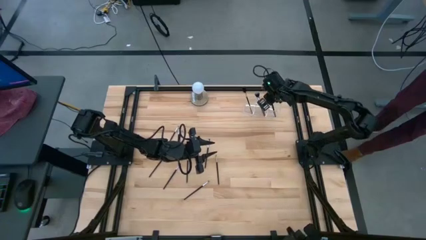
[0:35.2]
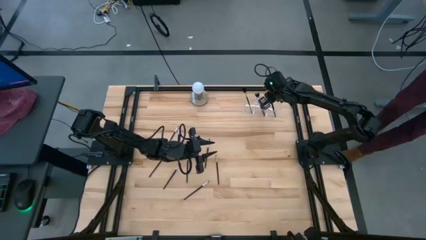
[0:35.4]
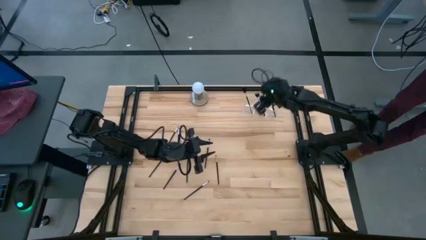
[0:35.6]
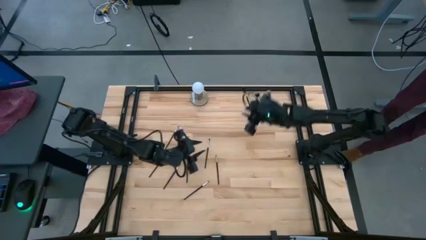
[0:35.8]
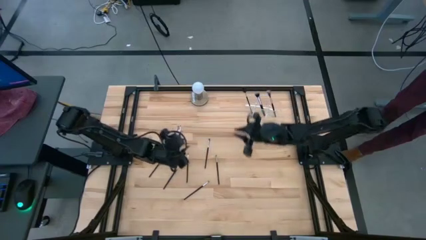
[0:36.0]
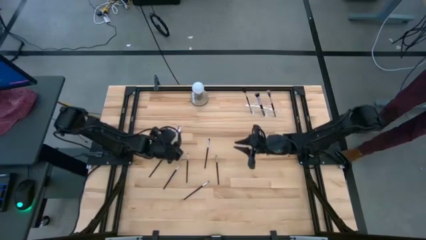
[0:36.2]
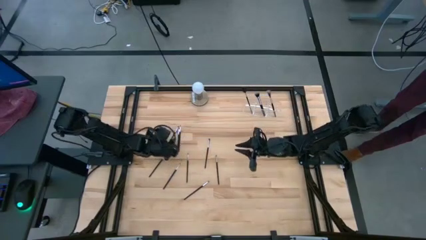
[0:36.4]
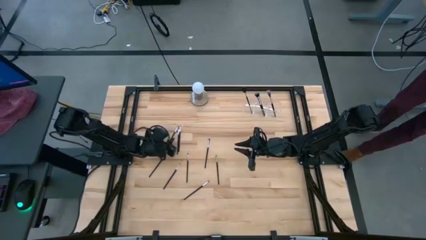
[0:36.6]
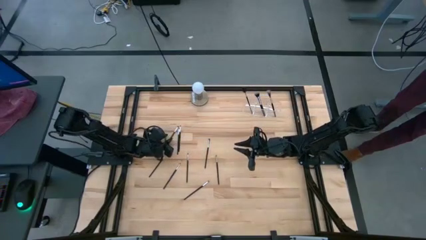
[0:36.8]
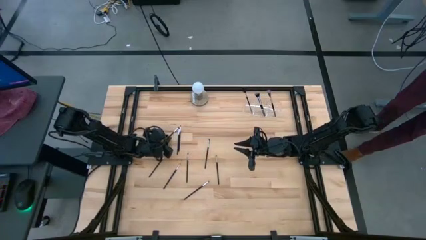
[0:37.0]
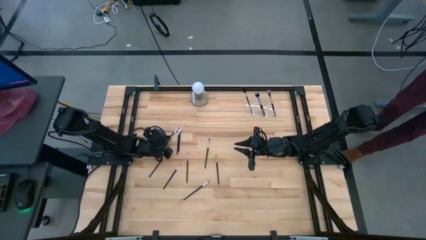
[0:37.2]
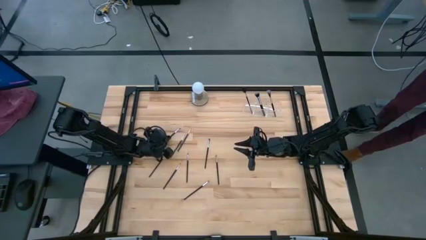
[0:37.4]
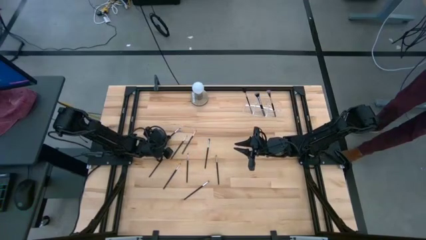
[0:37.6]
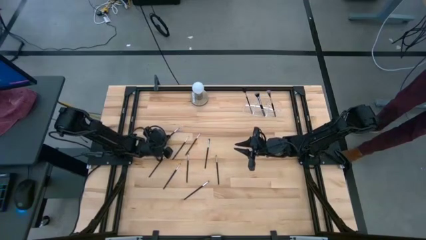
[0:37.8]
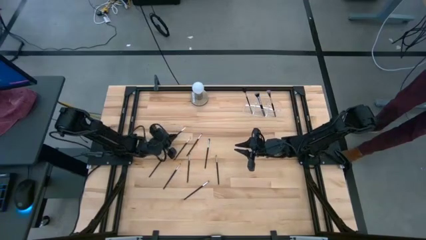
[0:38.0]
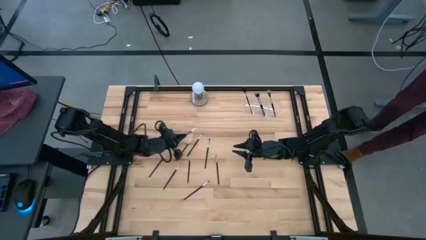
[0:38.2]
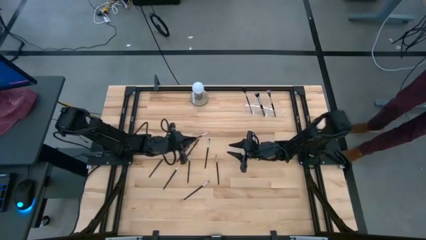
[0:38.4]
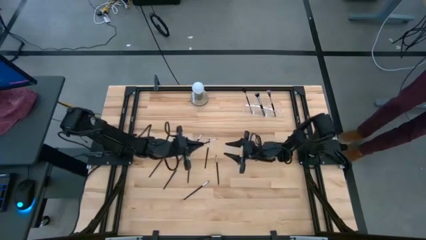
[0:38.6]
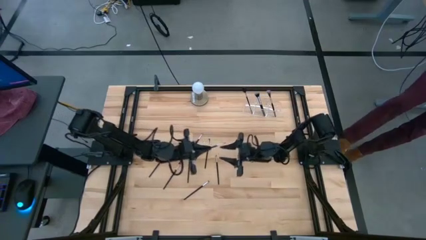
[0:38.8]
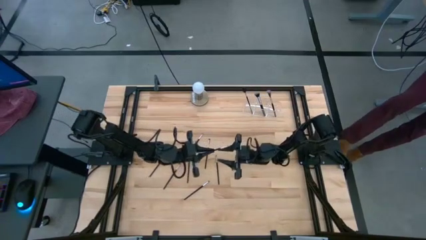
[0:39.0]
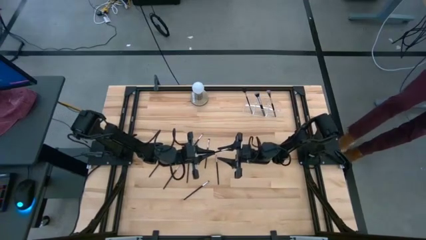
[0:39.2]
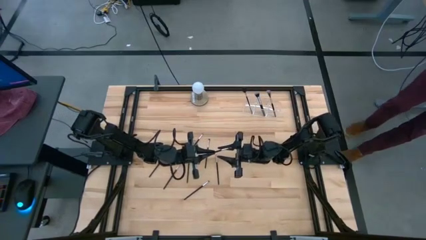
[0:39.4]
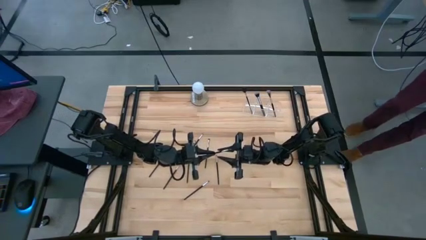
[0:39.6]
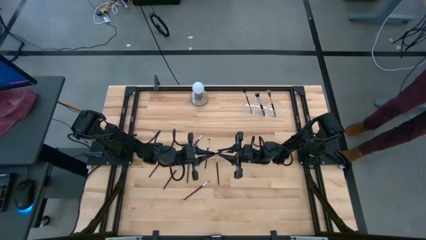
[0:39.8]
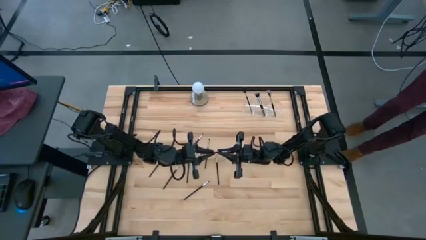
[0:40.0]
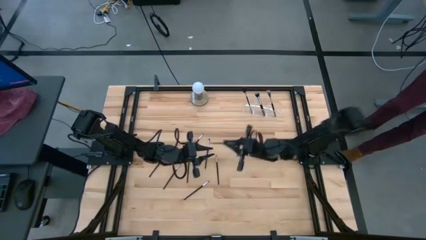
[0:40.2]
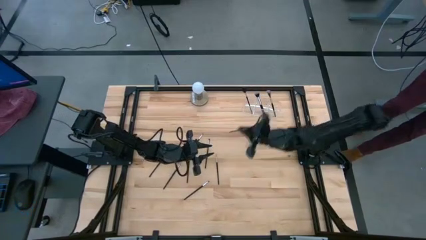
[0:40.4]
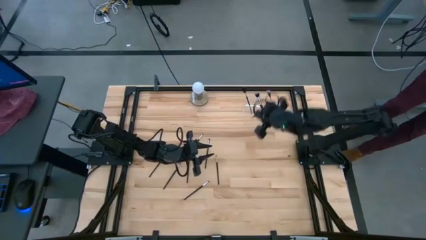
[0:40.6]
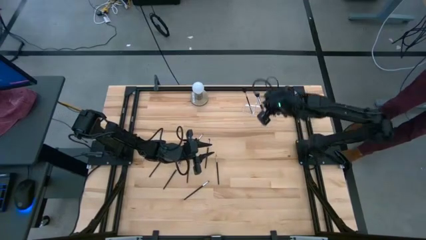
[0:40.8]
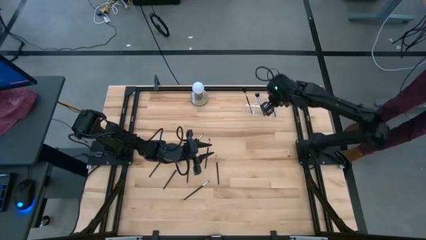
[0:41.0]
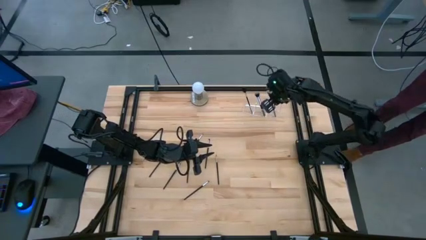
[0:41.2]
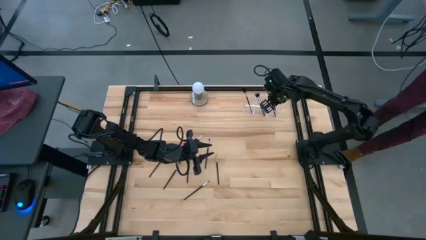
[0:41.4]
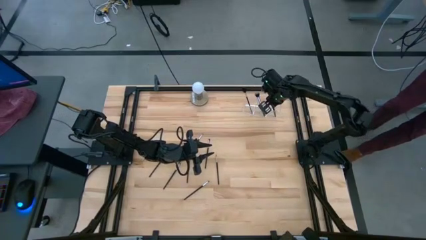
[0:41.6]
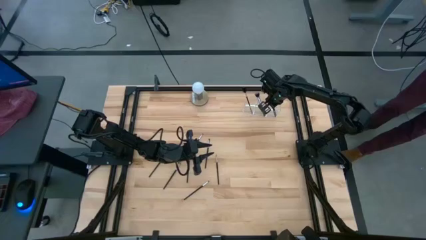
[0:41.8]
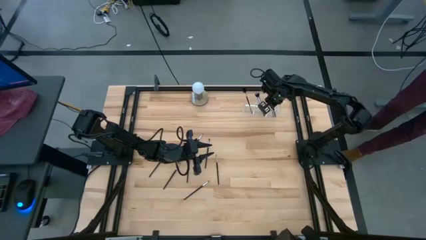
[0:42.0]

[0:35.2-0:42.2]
Task: Put items in baskets/containers
Put the silver eyeshadow brush into the transparent organizer

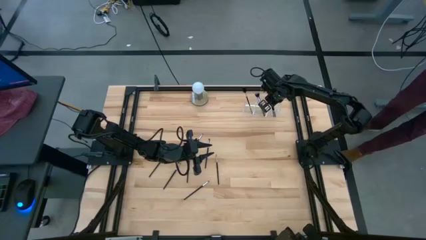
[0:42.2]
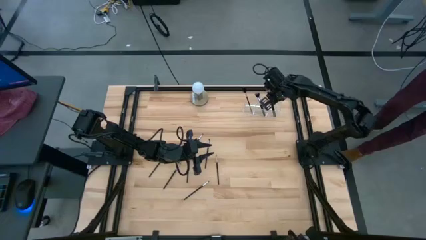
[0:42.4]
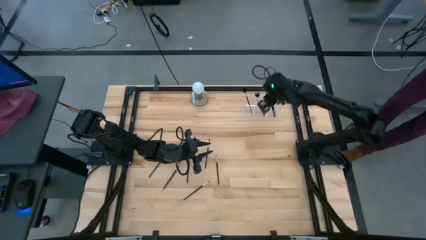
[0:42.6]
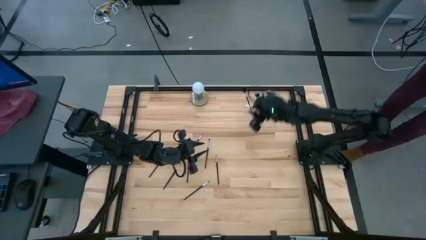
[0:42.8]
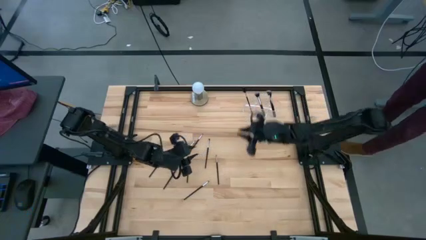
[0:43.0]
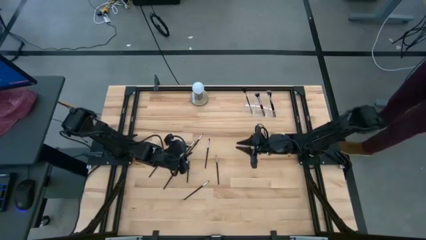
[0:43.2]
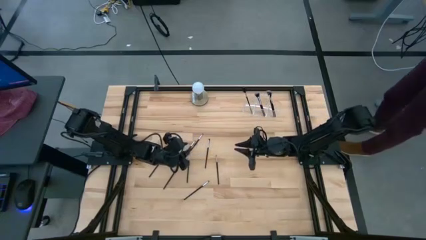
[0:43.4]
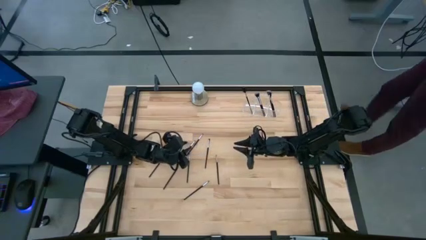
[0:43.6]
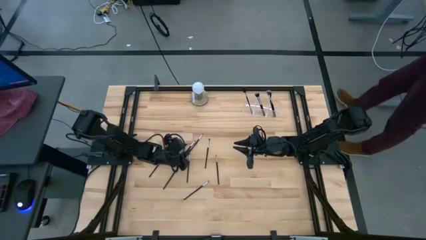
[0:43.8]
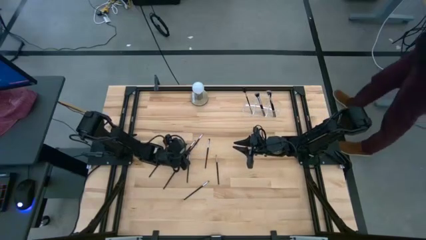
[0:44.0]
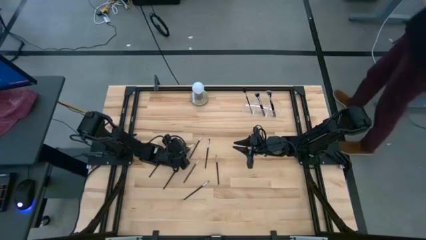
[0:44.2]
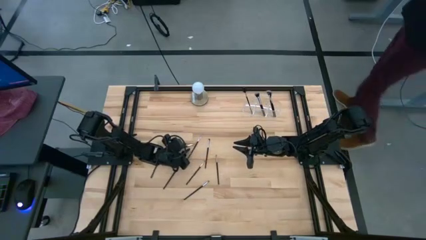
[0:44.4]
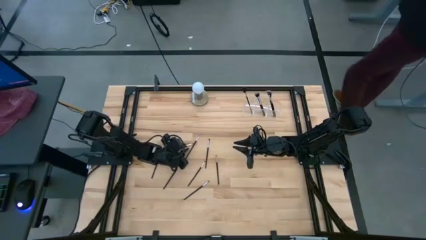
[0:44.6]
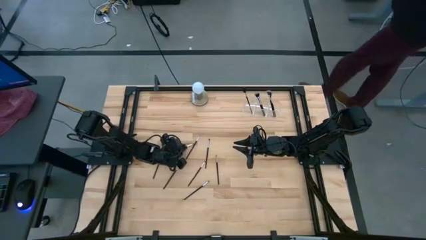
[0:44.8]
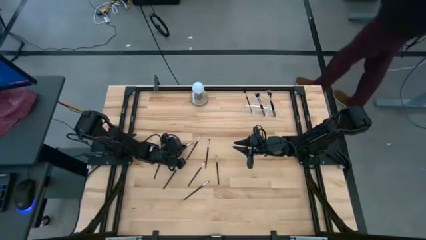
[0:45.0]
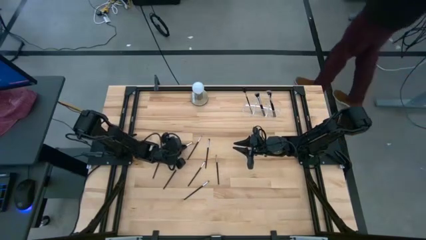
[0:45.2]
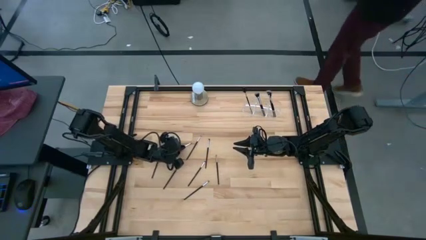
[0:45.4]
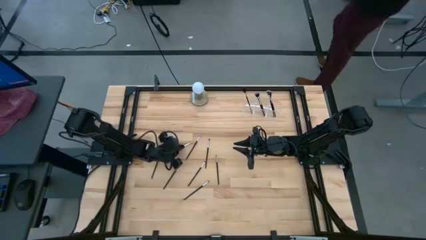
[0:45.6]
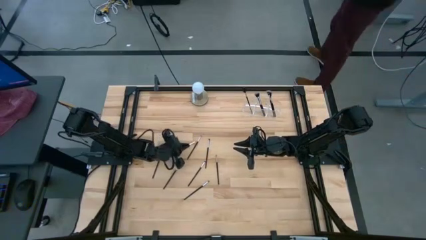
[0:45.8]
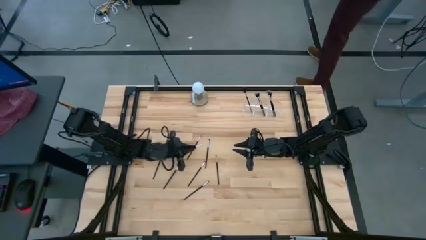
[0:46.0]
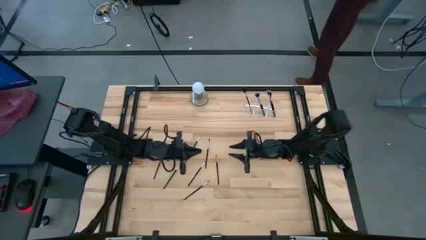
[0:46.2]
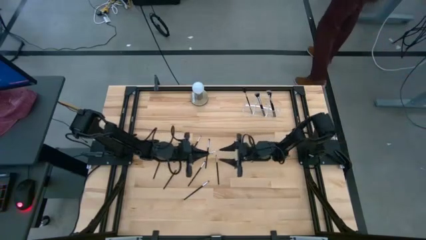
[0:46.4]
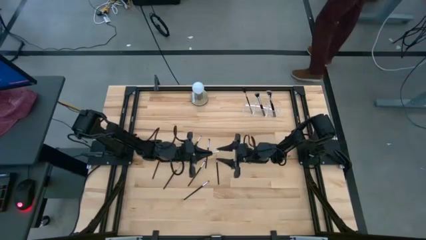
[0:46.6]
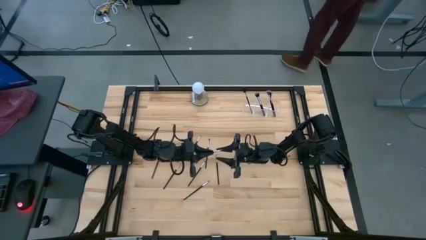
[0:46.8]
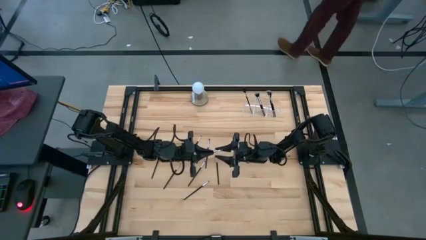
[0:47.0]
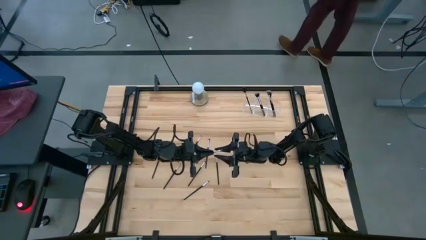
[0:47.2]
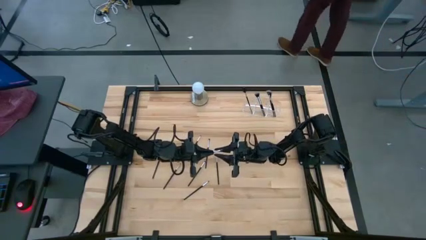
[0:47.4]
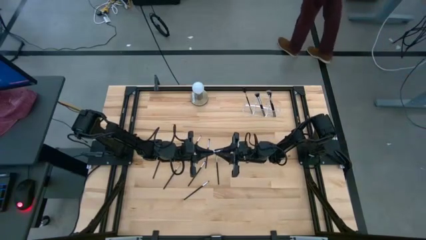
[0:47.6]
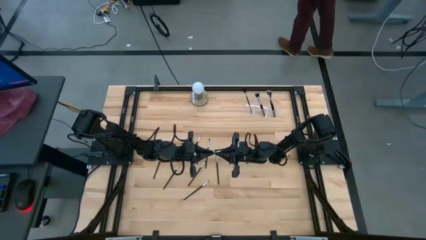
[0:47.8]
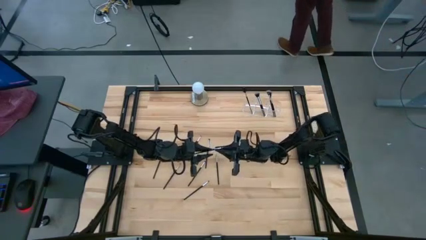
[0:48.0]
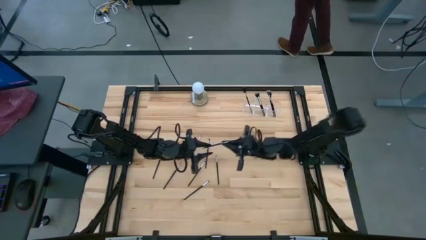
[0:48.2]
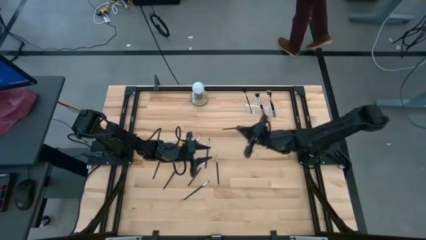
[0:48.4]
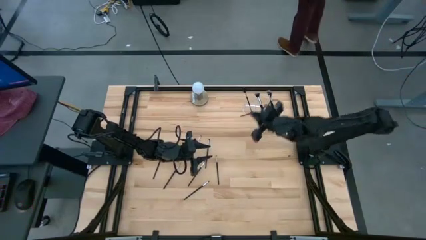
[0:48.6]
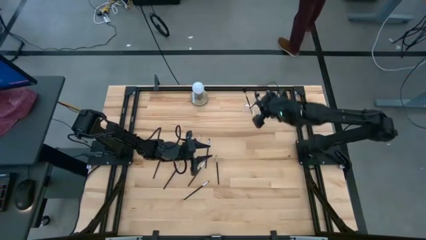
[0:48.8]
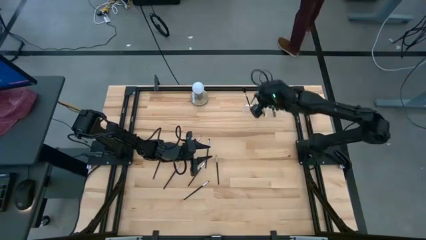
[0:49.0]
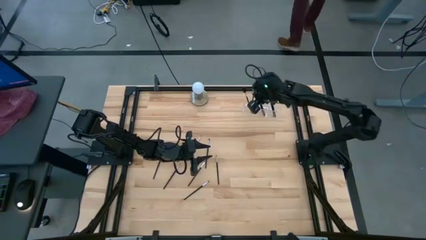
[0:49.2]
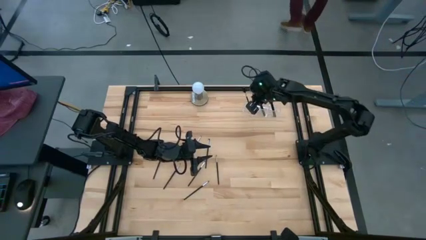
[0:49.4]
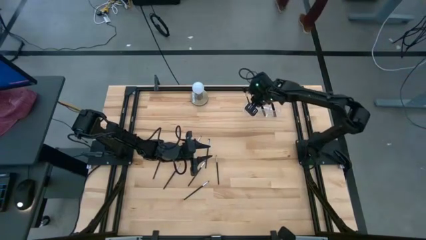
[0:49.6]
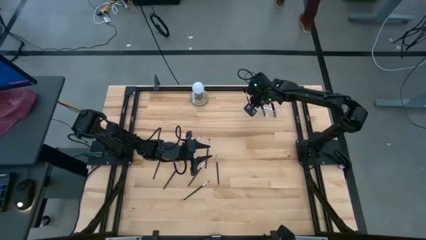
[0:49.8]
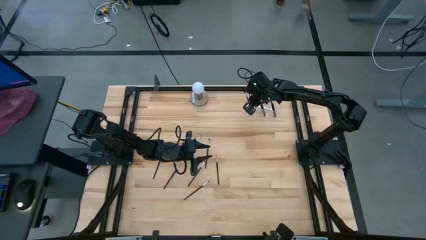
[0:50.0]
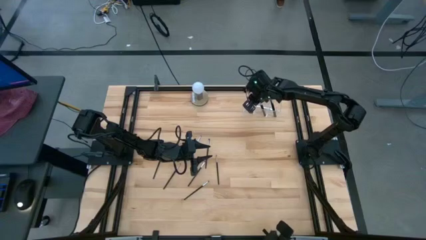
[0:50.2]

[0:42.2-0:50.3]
Put the silver eyeshadow brush into the transparent organizer
